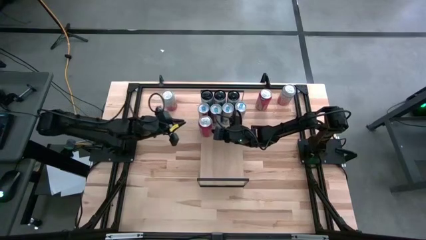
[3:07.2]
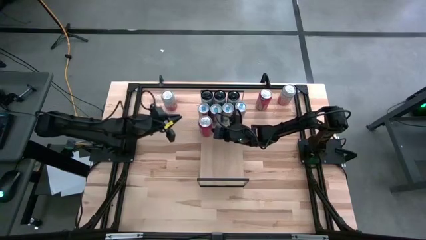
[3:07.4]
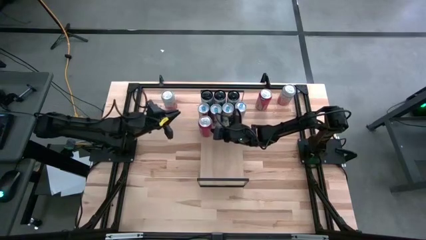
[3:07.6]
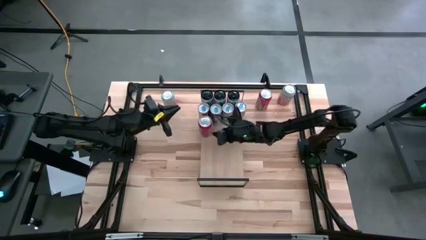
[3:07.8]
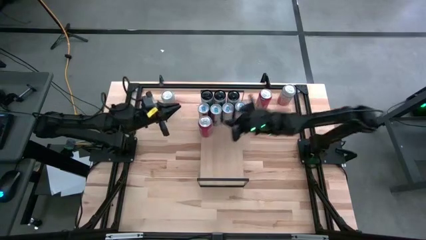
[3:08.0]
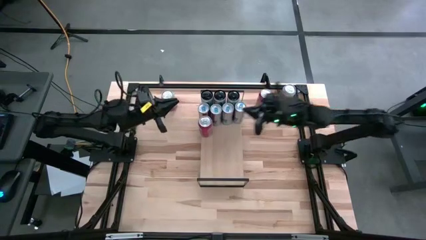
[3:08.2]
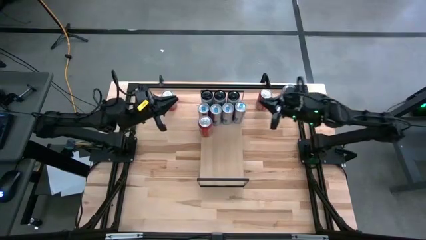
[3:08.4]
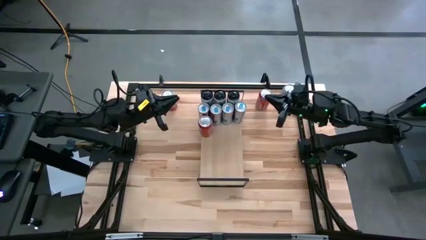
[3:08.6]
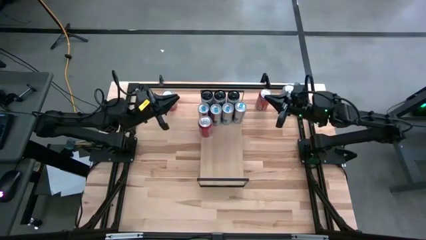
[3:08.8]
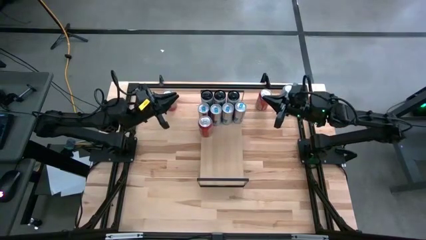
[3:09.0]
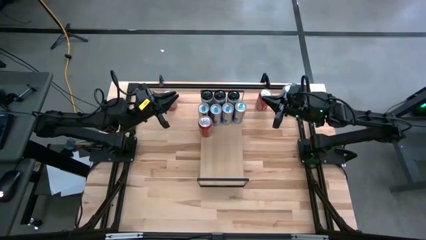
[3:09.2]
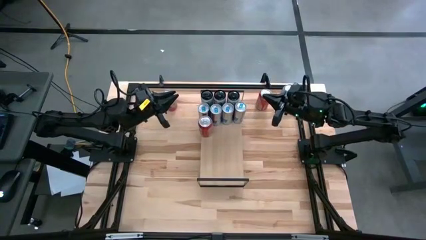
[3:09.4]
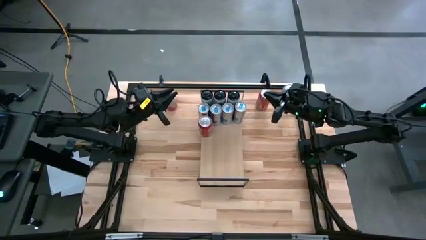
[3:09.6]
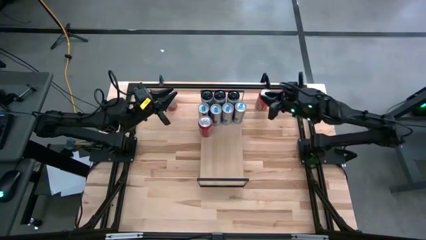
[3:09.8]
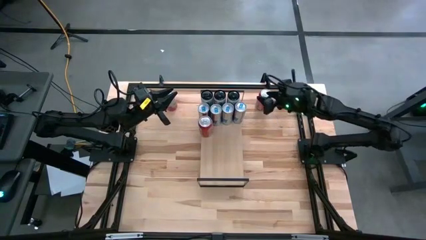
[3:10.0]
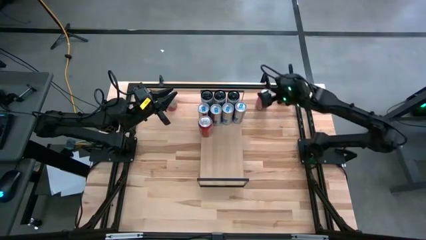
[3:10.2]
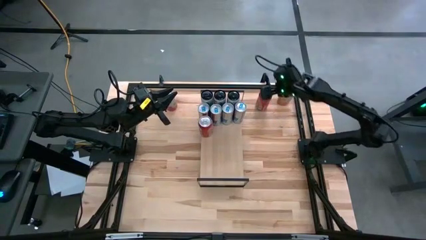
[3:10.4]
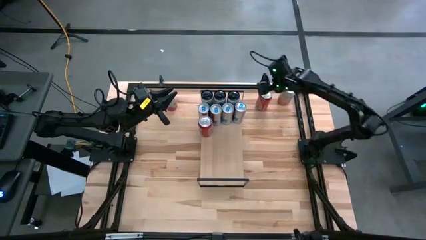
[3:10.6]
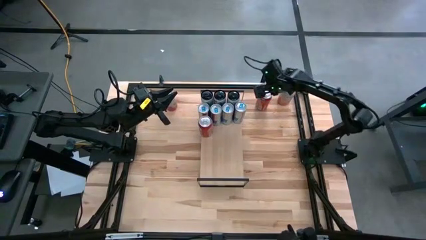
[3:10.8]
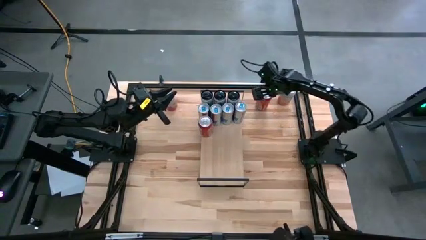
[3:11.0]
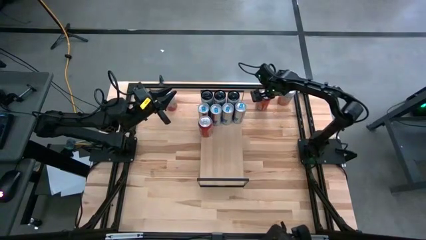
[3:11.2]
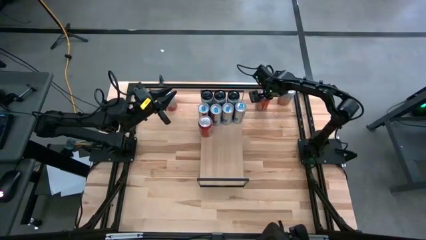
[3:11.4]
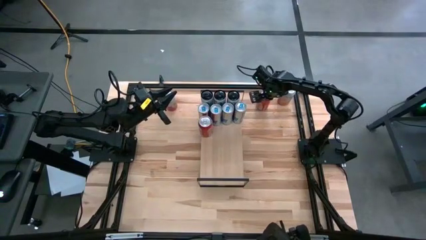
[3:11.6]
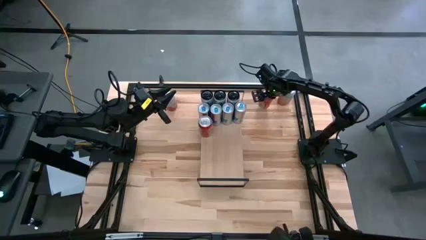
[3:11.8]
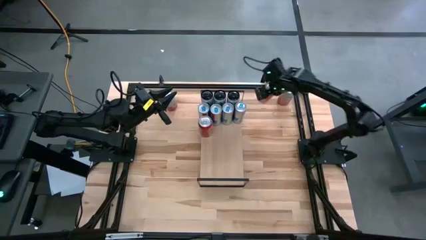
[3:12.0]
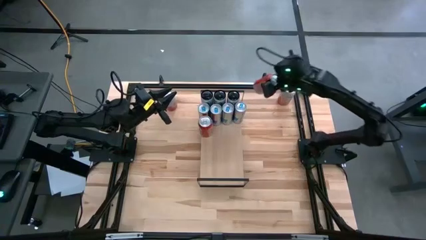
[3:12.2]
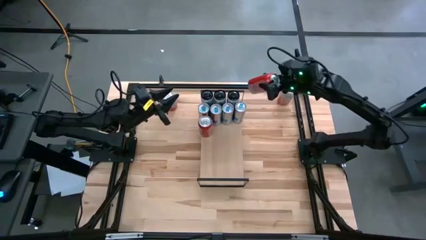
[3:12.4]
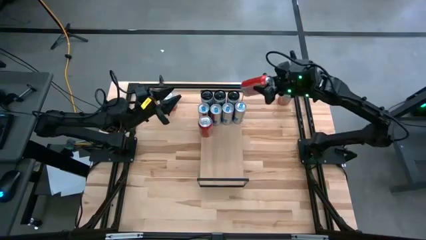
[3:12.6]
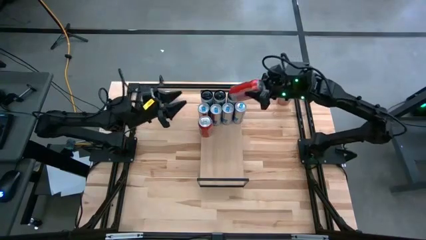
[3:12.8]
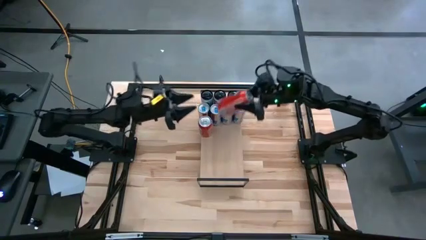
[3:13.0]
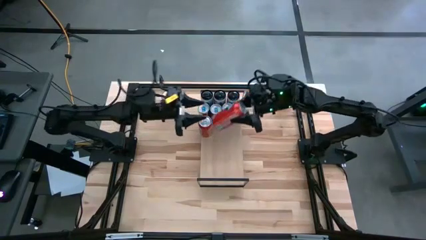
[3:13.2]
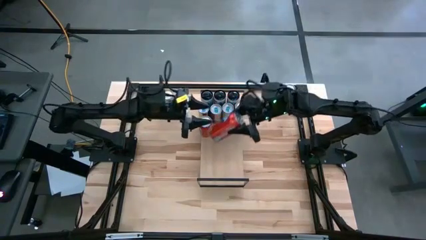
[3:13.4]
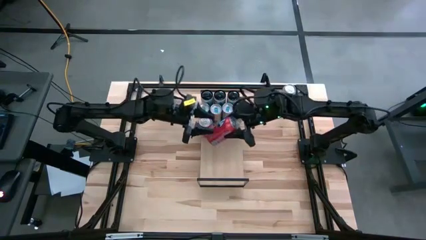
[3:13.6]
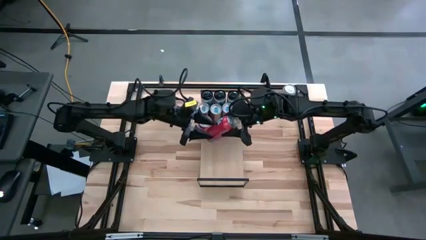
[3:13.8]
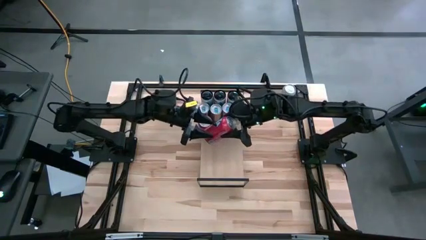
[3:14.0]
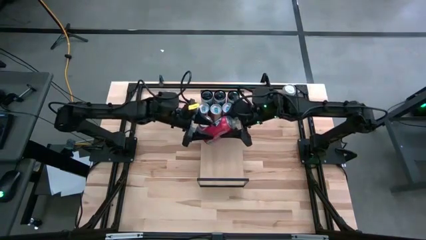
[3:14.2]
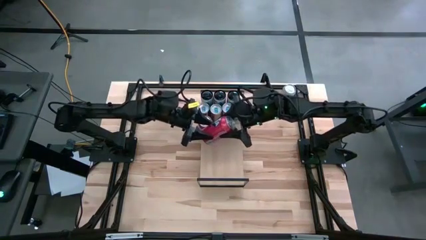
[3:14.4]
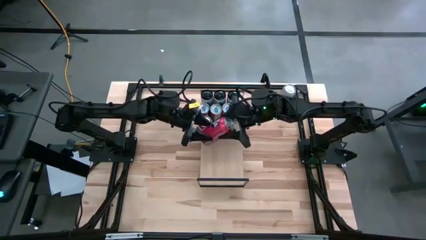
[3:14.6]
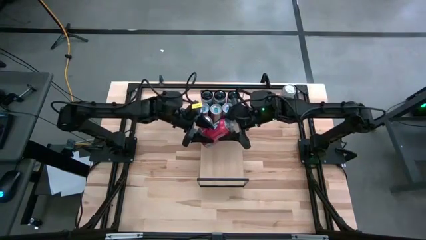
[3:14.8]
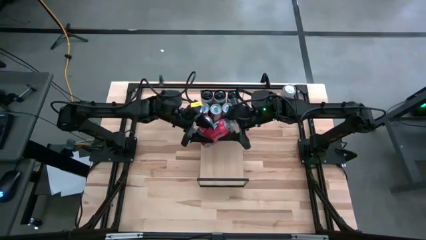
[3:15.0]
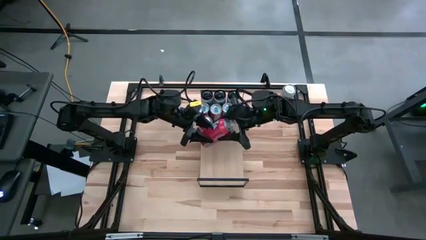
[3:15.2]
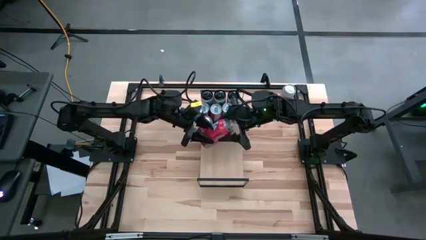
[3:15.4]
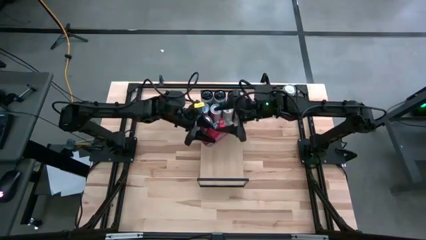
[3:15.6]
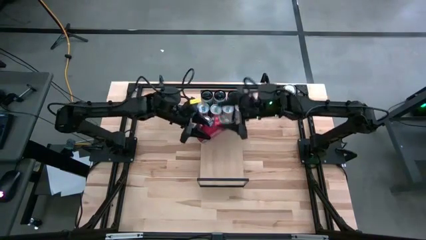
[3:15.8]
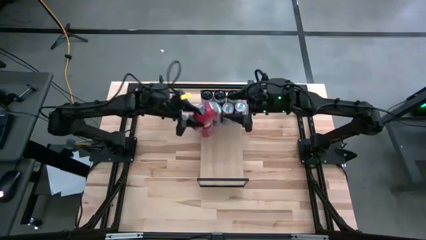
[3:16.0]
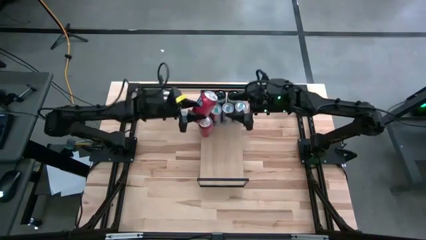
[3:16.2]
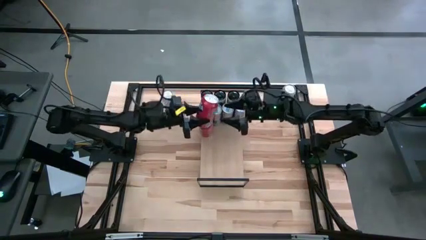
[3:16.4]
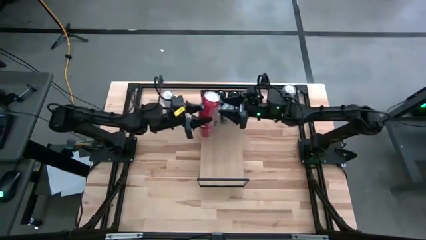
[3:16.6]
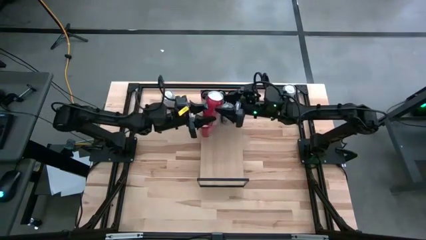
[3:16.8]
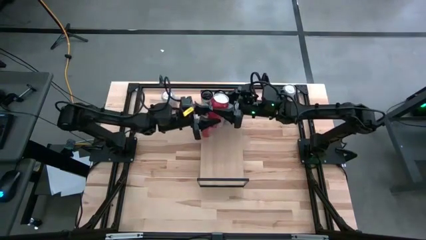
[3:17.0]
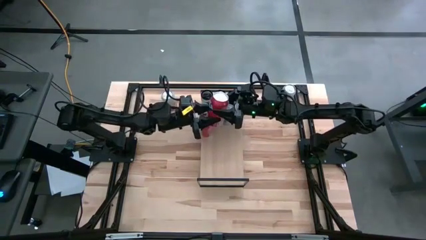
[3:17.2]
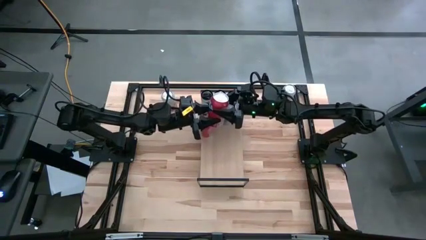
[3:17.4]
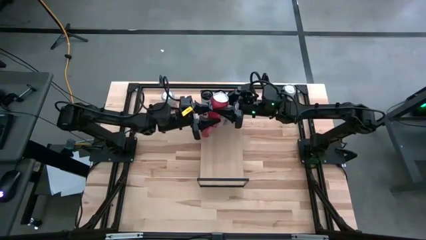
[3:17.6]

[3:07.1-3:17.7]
Task: Place canned beverage on shelf
Put the red soda can on the shelf aligned with the other red soda can

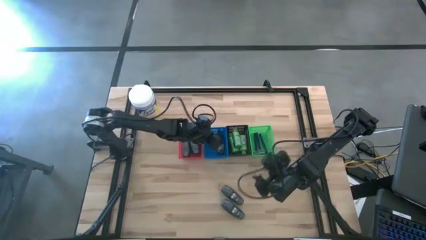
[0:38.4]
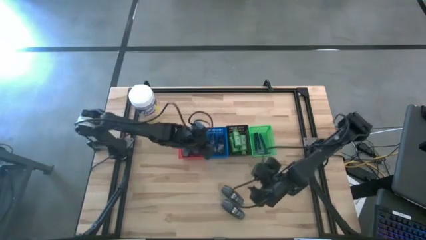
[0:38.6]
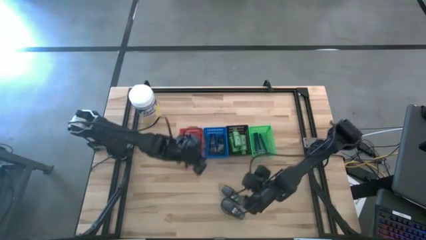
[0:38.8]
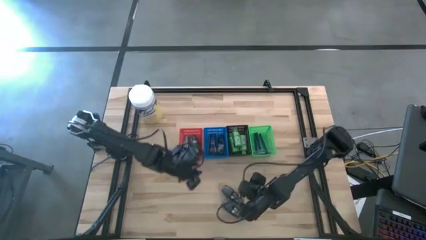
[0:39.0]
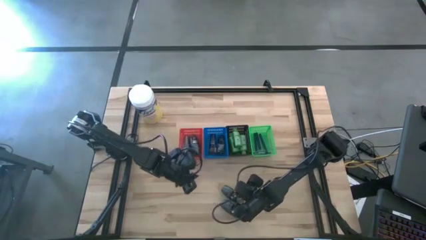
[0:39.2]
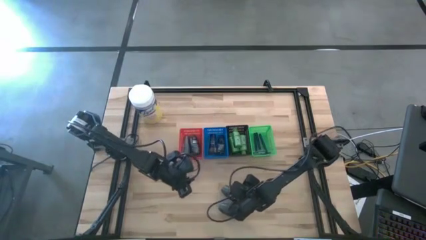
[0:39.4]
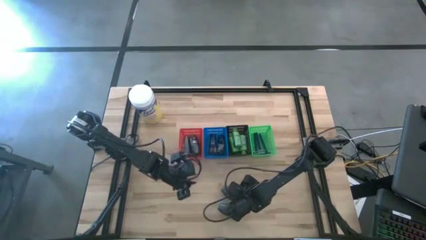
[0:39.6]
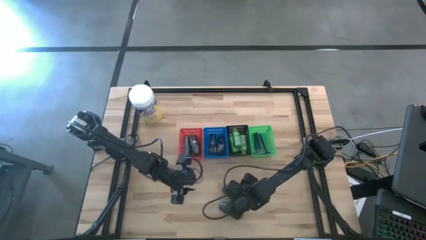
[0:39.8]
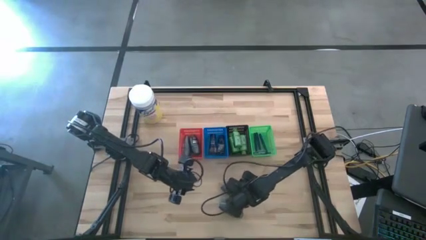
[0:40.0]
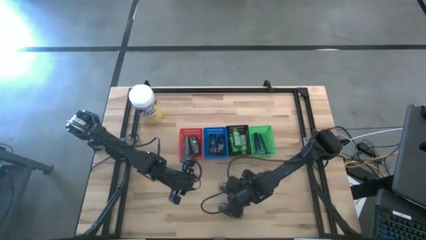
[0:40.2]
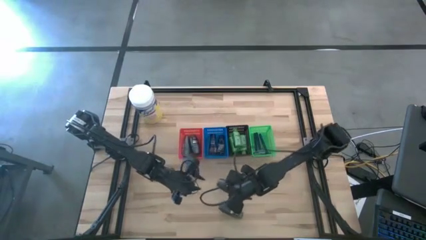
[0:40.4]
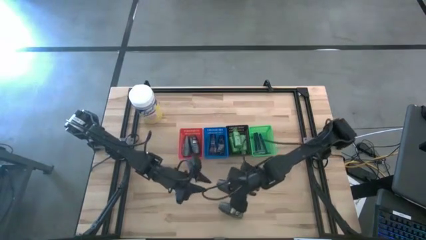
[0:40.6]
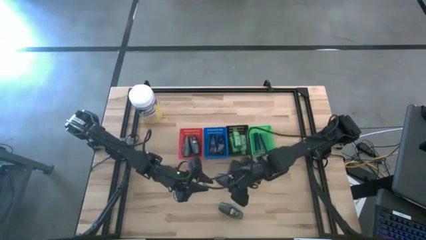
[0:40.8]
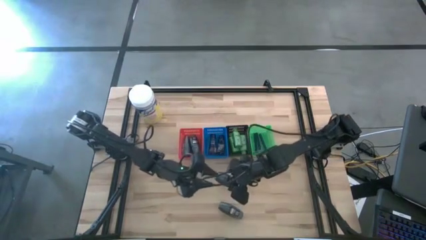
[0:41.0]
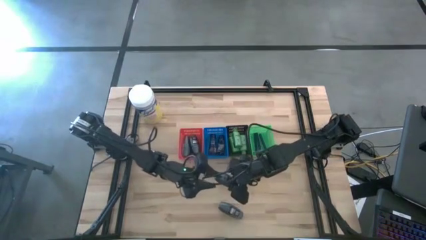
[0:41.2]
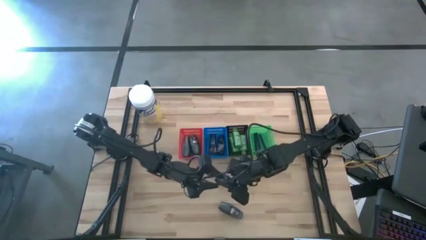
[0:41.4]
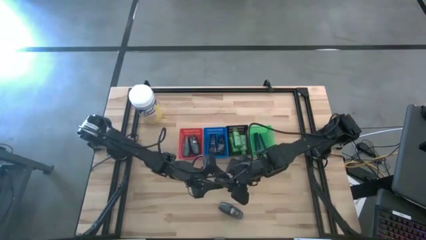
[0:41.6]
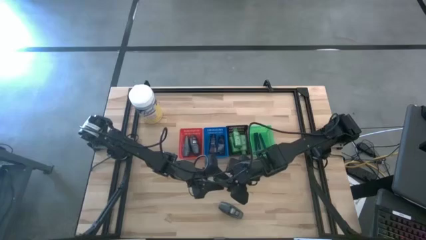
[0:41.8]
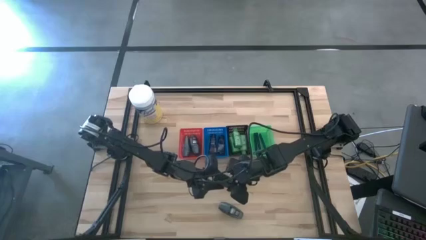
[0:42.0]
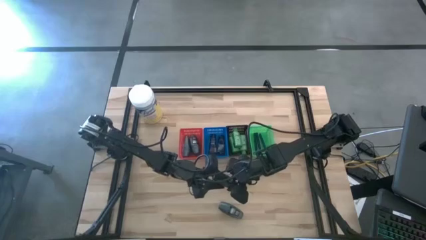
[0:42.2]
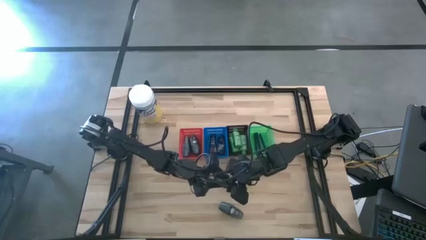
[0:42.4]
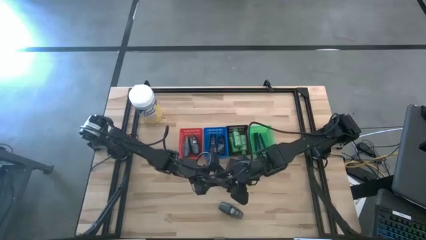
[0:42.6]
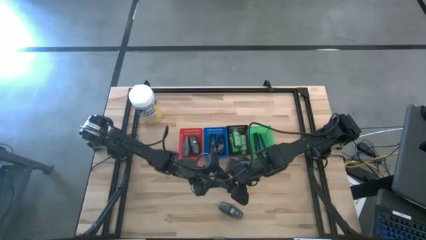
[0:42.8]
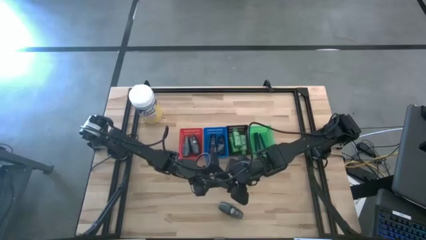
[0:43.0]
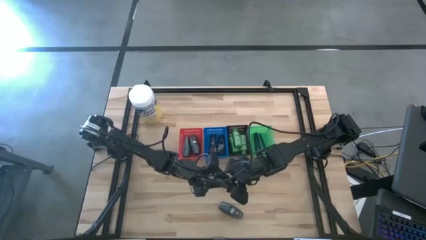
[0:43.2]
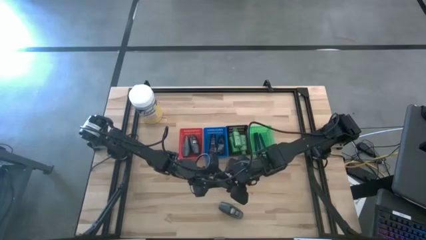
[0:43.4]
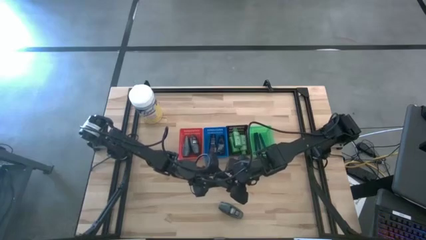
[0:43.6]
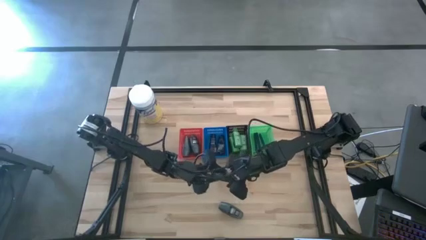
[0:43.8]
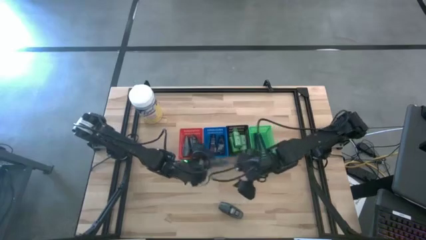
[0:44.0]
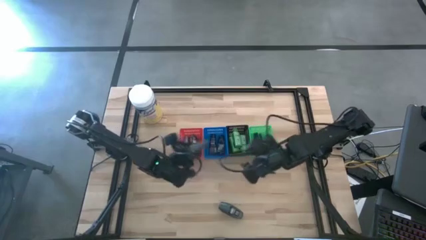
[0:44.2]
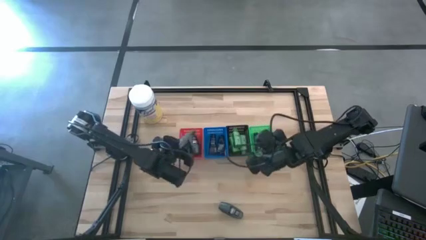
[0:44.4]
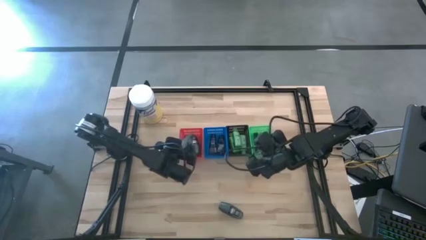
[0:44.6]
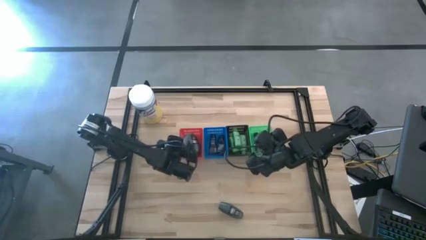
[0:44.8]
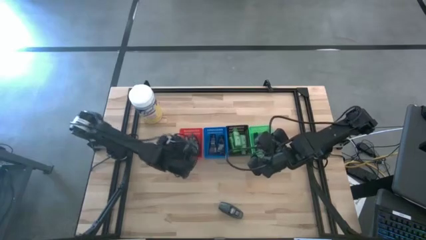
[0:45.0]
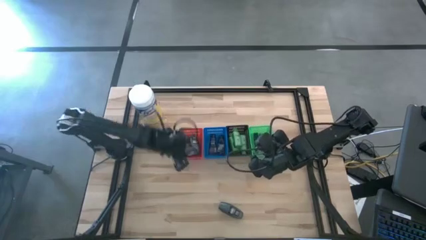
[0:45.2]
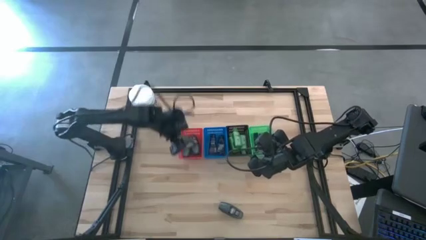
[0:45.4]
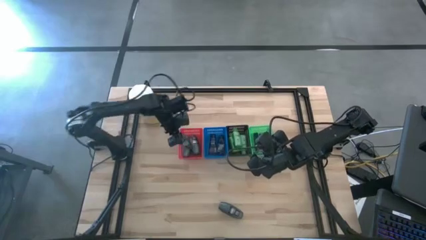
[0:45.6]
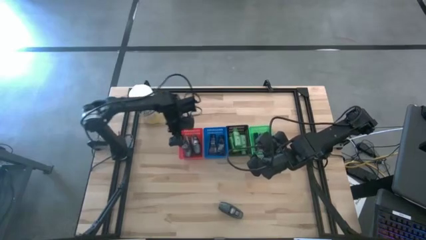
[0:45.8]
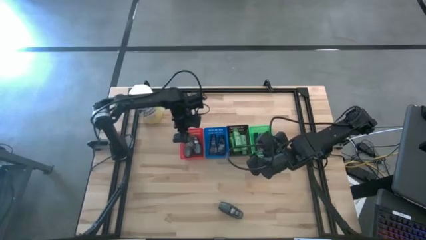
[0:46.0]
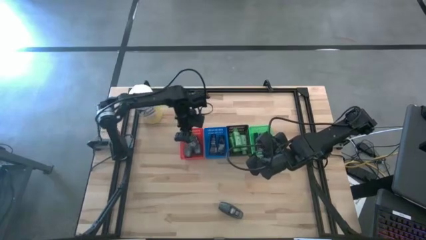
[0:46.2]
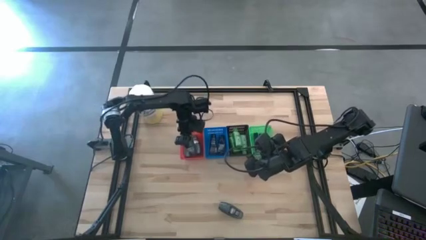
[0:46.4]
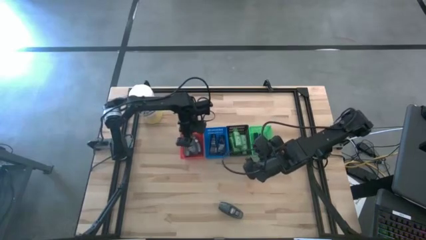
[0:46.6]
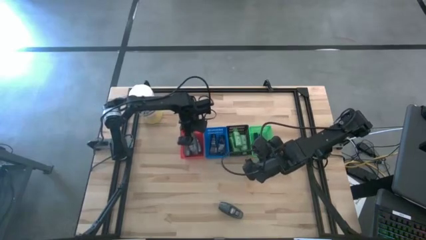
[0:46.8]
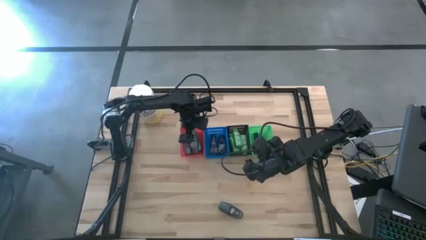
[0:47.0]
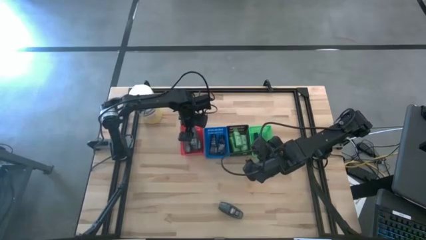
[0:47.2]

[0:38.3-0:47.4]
Task: Pick & Place Travel size toiletries
Put the black deodorant into the red bin
